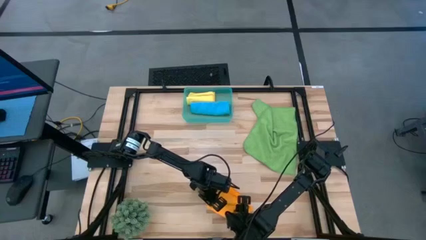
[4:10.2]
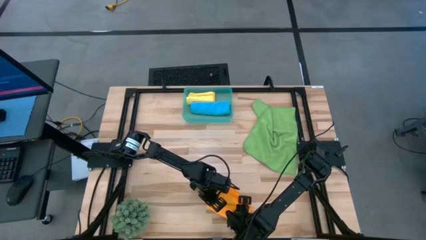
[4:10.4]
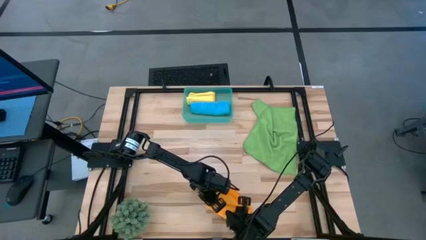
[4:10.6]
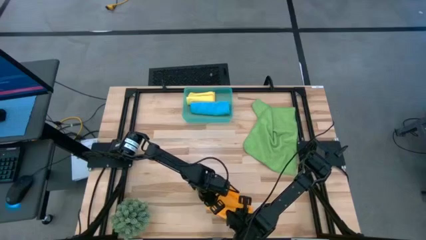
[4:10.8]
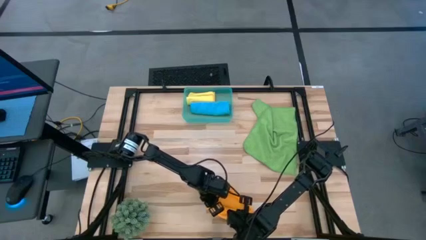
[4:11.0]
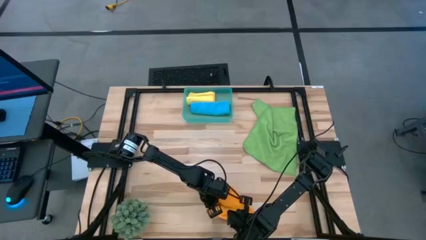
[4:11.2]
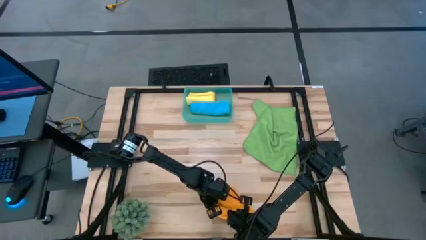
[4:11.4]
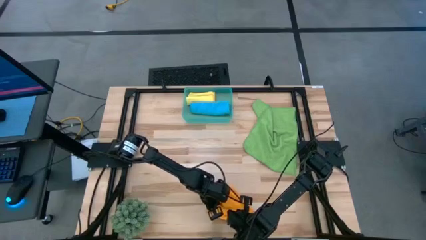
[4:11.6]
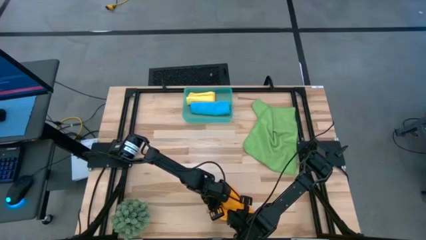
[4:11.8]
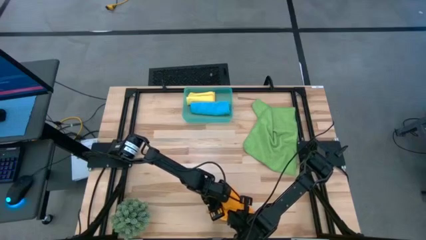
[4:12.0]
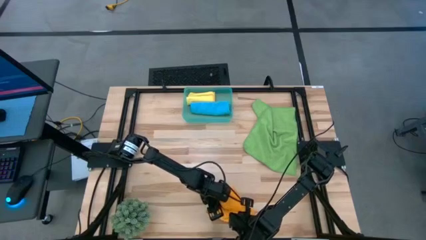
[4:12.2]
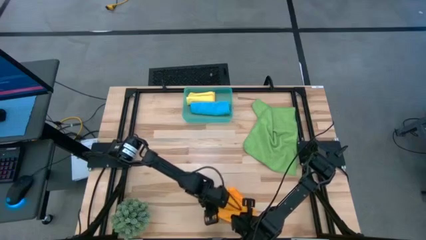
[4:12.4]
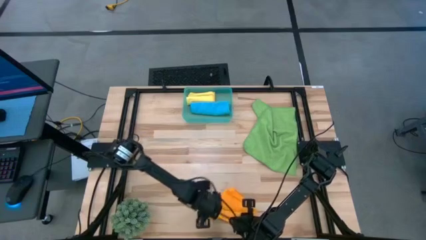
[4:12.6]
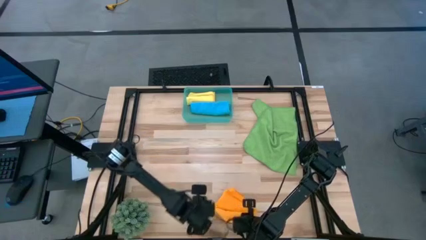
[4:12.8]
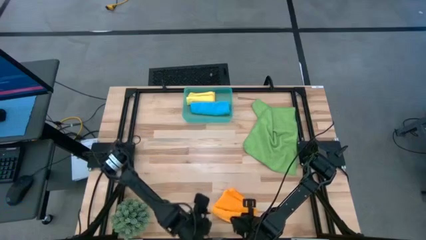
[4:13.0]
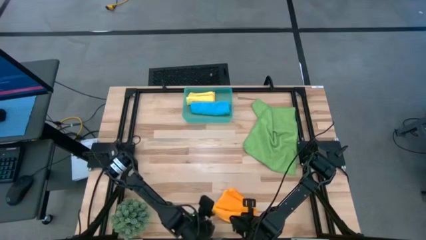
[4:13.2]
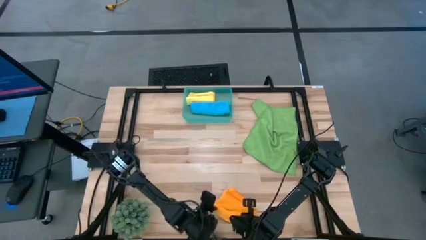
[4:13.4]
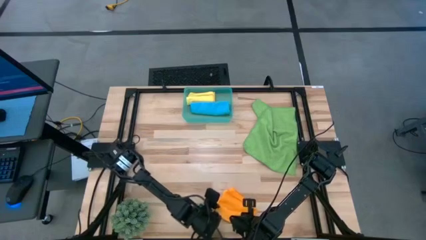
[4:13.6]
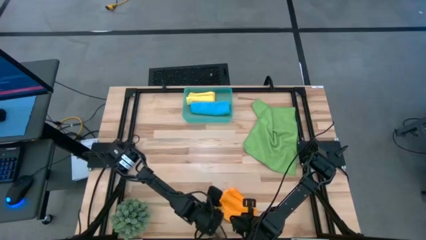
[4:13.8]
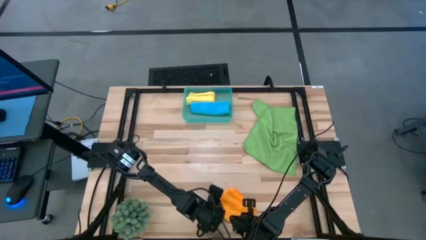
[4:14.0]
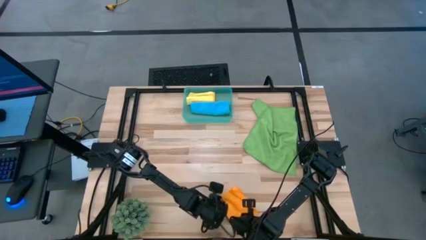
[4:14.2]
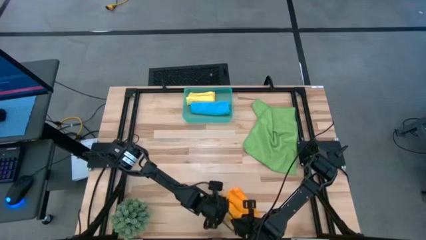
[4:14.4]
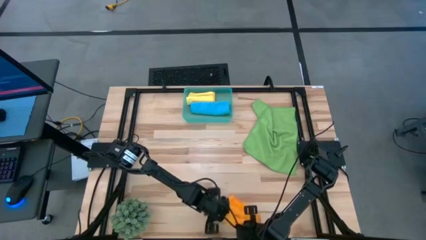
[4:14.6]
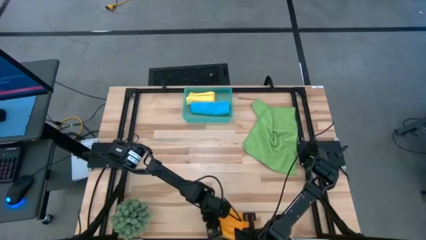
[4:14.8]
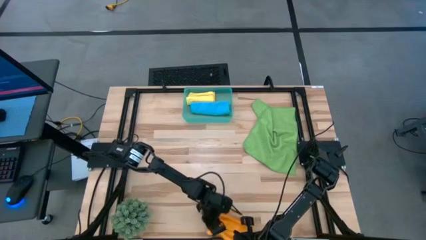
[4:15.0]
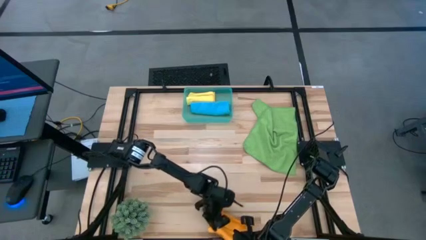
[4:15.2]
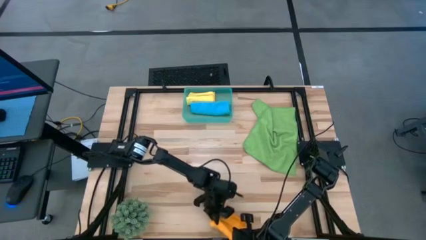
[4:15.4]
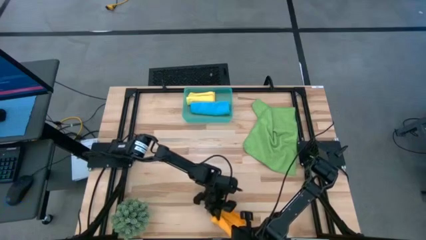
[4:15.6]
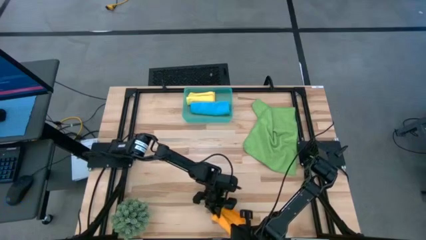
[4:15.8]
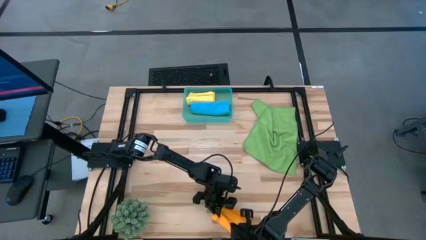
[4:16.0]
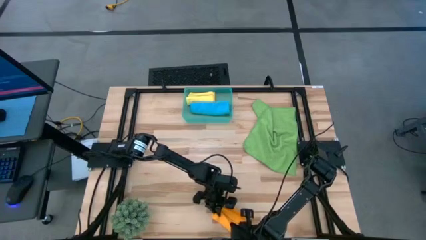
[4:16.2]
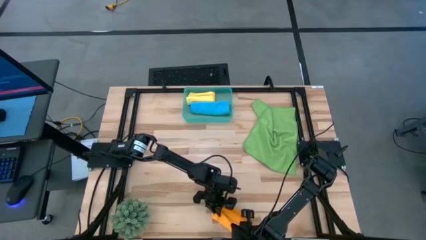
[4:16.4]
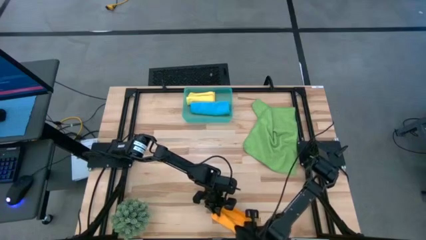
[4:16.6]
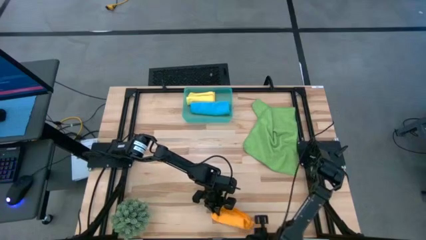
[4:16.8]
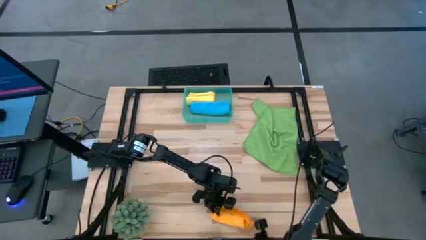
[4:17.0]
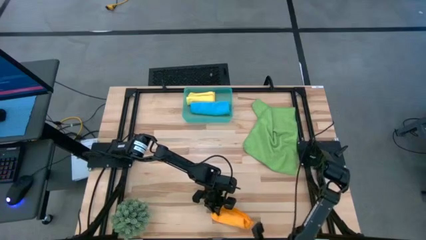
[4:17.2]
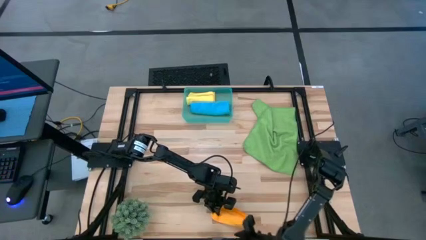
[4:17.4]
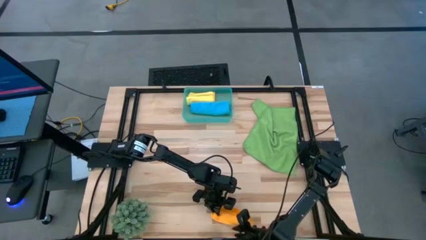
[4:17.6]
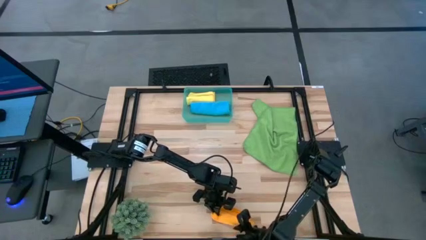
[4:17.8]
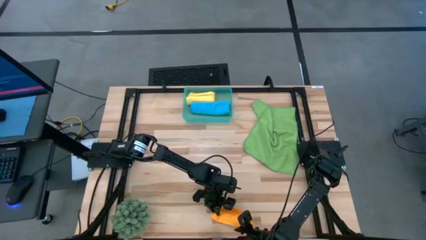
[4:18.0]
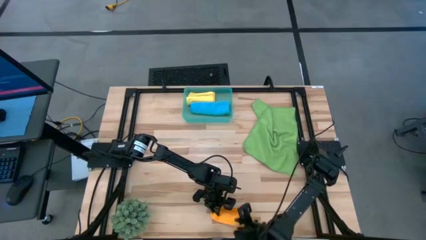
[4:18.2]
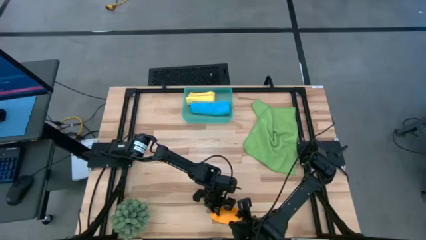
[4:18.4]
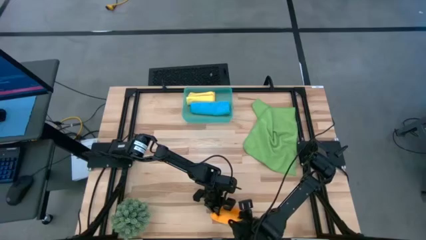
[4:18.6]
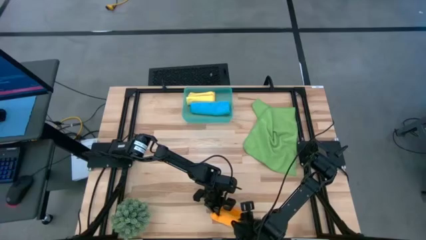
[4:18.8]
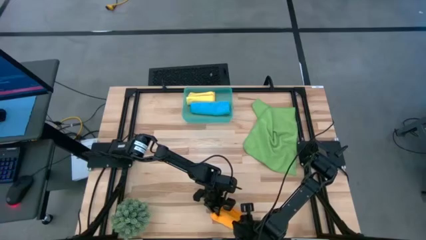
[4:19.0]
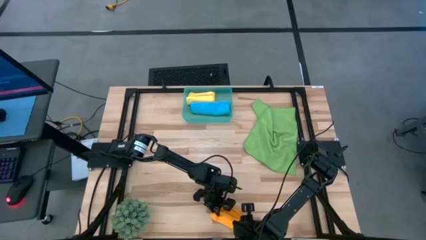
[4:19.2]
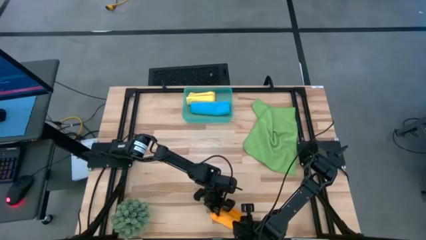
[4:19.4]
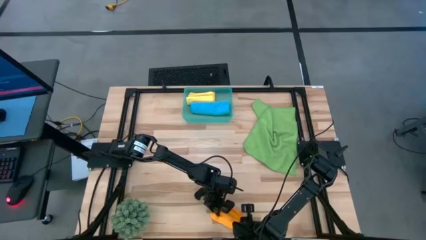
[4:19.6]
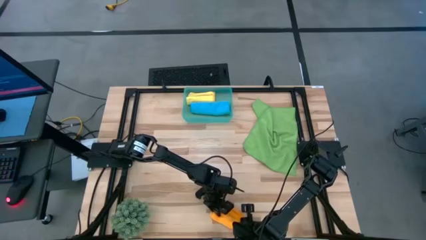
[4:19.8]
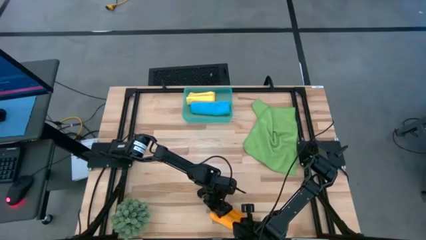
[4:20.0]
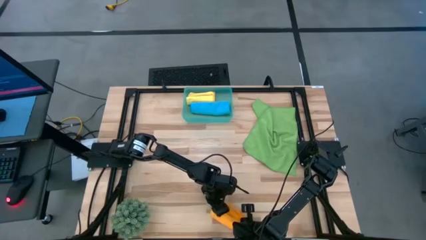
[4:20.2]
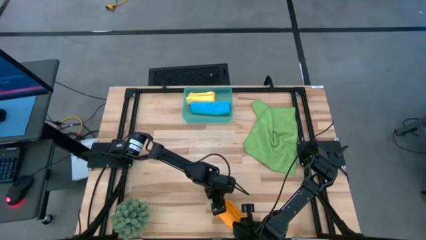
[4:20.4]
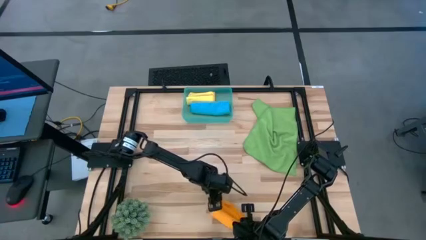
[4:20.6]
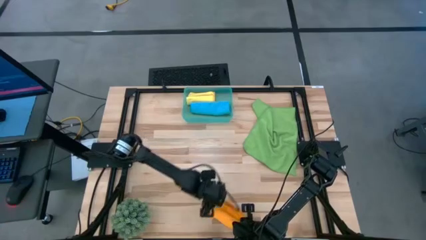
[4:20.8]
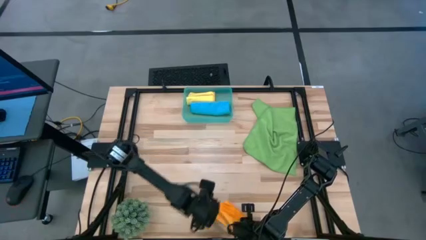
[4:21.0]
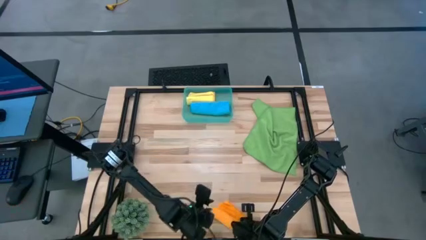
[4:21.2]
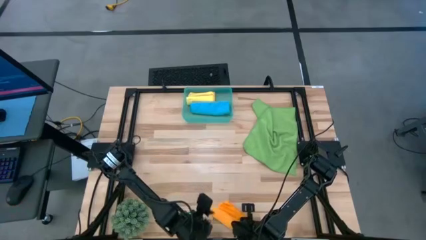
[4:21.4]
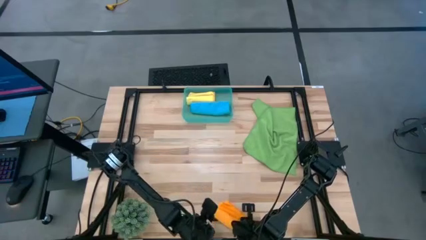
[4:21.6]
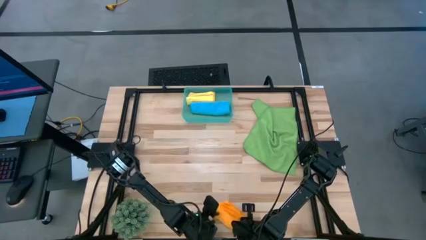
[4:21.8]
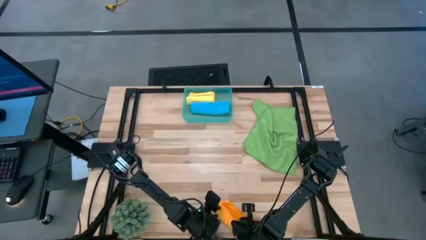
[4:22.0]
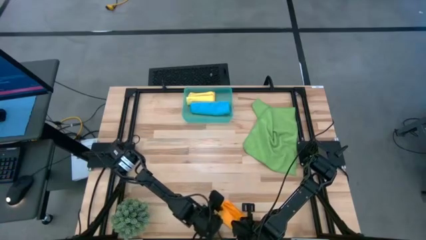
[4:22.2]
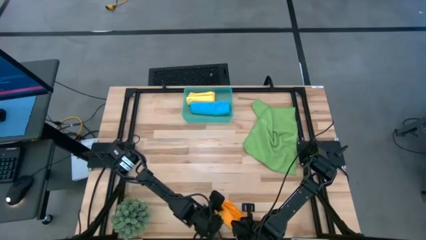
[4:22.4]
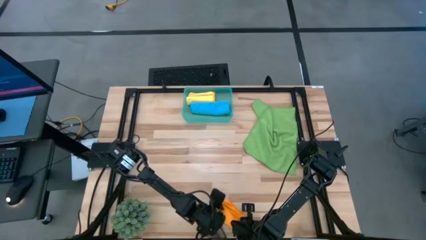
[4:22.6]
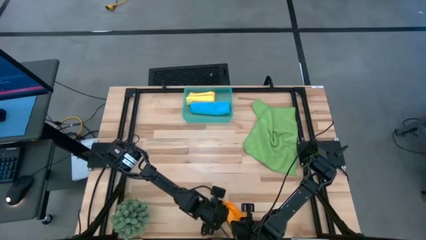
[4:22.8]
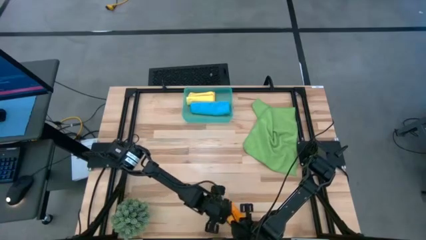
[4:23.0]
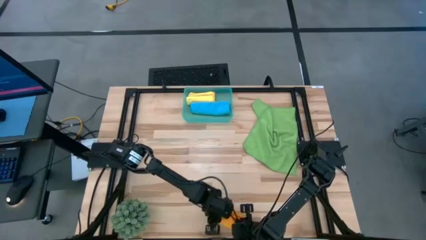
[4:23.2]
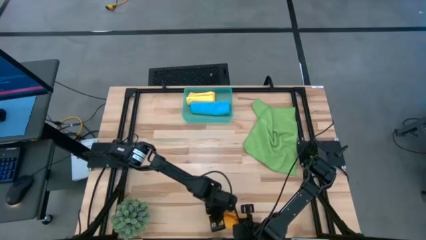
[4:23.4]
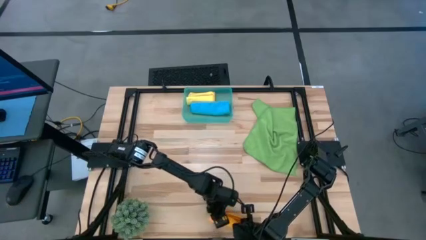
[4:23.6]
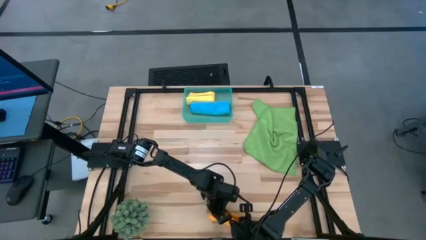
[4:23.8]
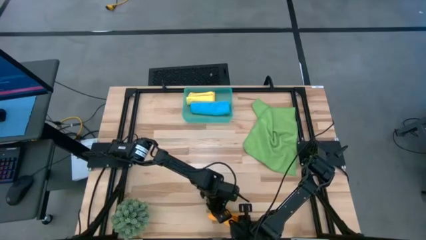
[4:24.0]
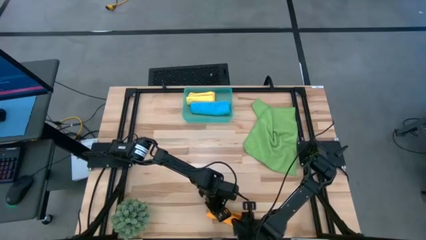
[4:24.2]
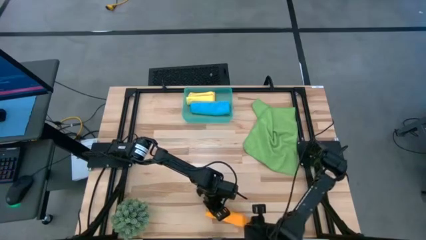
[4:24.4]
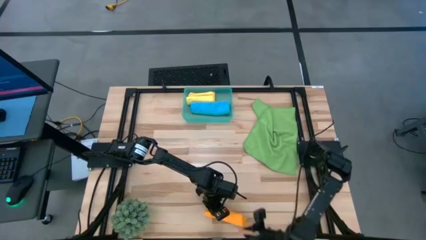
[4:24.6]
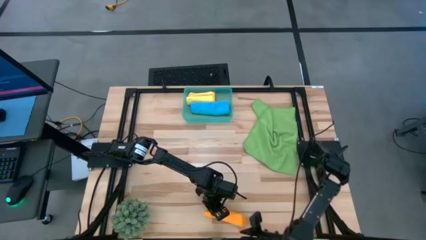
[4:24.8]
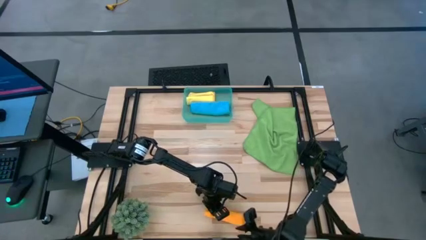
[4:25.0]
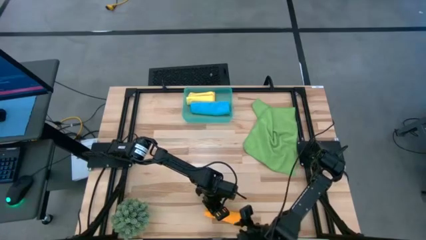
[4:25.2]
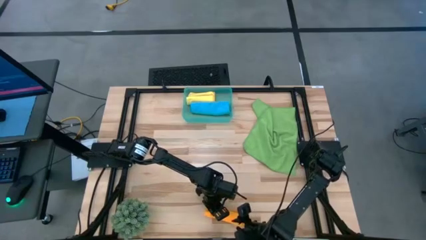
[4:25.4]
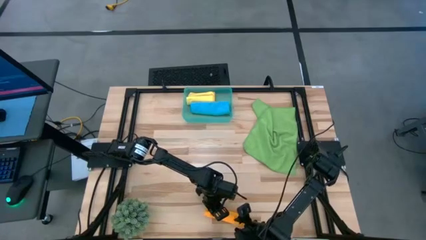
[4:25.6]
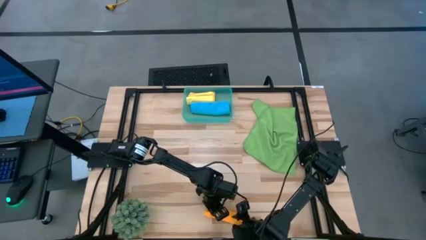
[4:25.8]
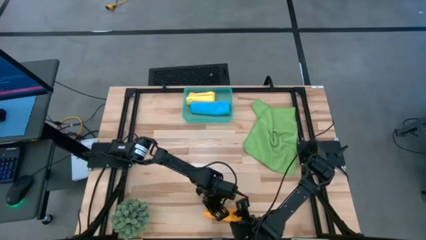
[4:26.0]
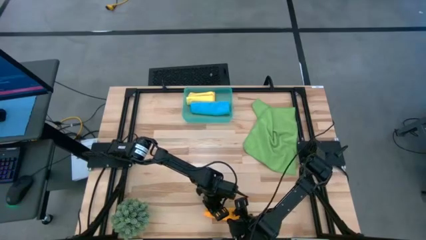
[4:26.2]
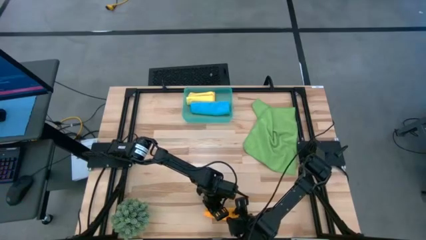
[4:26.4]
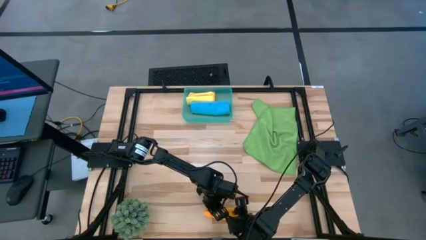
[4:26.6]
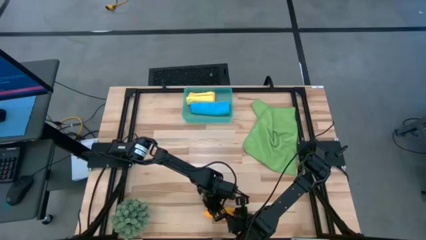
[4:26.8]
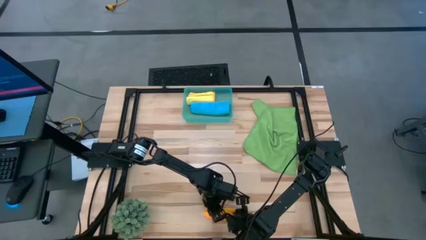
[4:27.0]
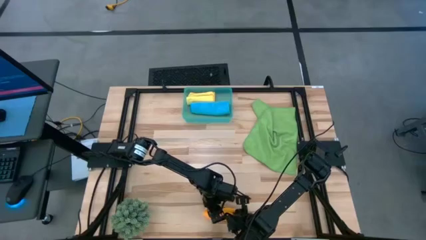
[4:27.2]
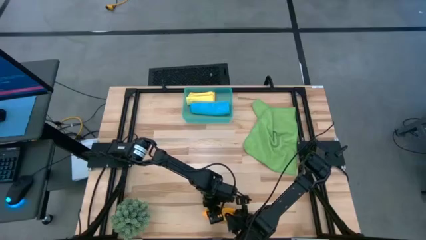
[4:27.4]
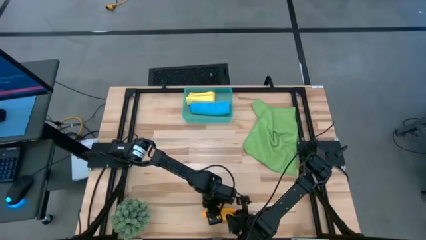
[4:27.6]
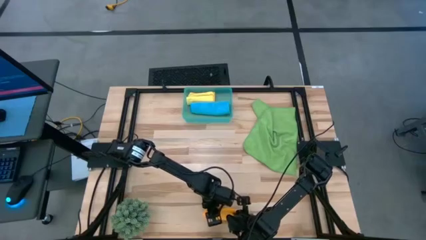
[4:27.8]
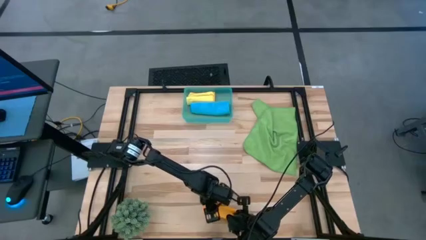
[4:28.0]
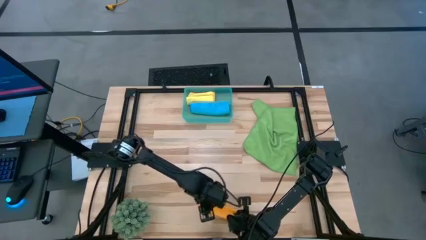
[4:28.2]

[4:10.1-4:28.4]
Task: Roll microfiber towels into tight, uniform cylinder then place into a basket
Roll the orange microfiber towel
